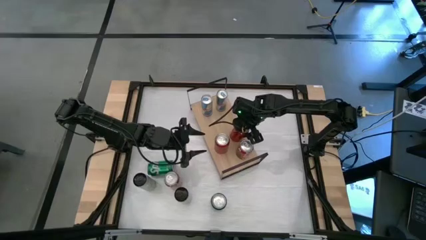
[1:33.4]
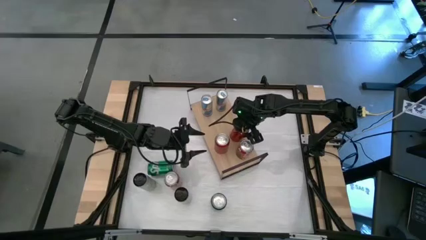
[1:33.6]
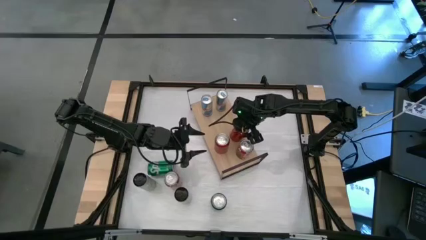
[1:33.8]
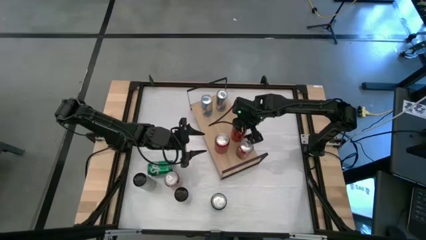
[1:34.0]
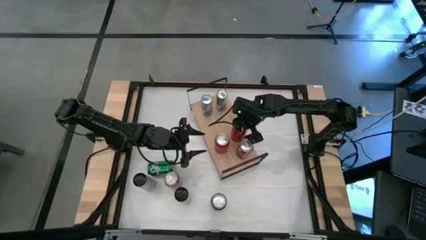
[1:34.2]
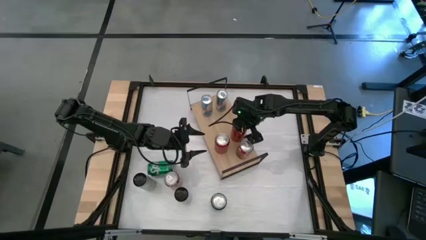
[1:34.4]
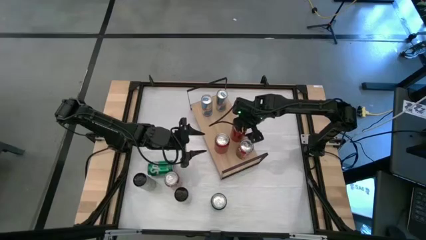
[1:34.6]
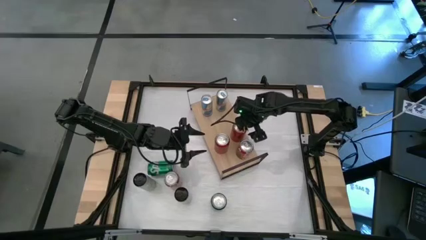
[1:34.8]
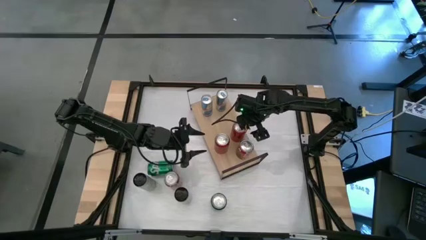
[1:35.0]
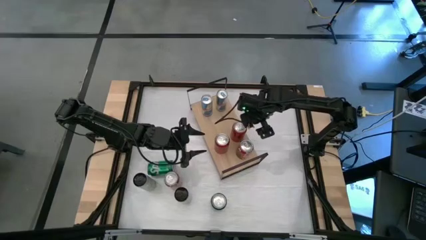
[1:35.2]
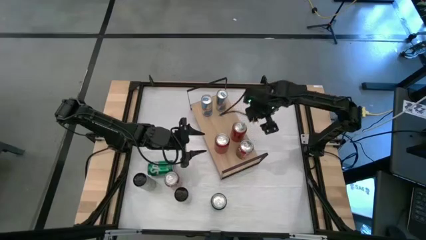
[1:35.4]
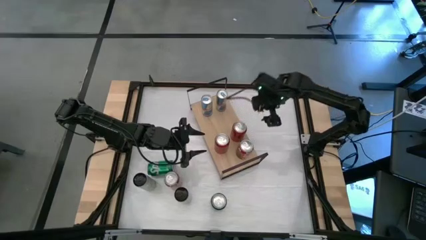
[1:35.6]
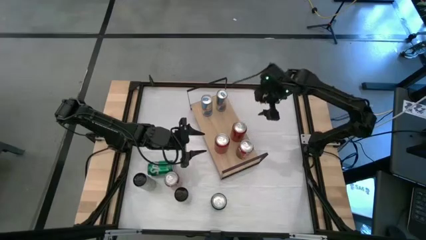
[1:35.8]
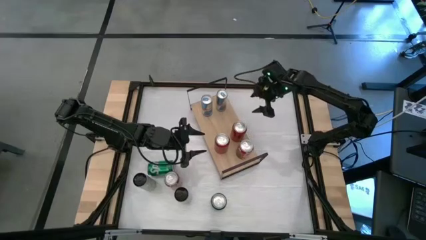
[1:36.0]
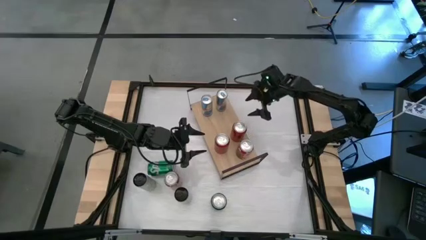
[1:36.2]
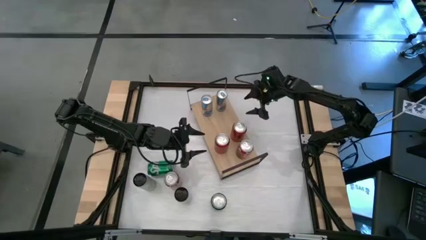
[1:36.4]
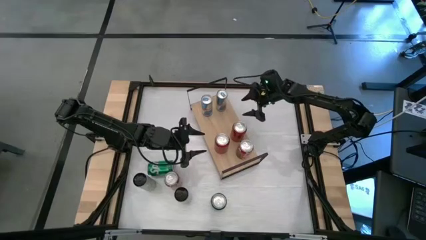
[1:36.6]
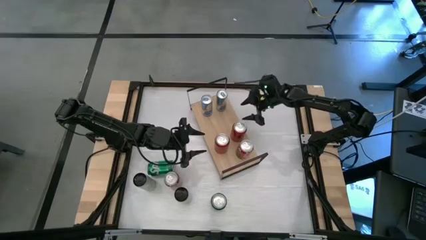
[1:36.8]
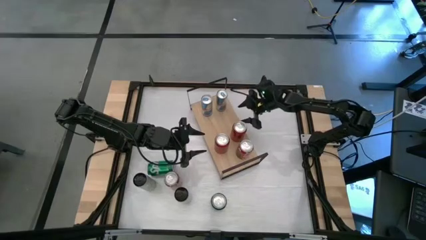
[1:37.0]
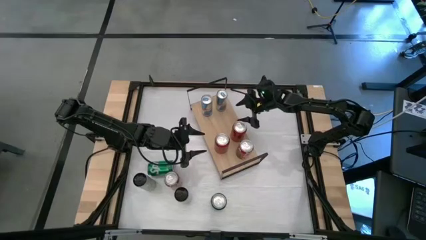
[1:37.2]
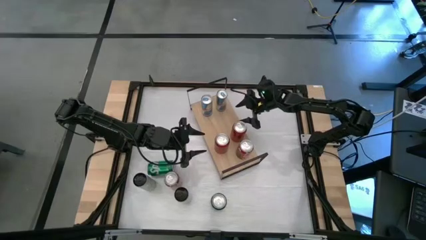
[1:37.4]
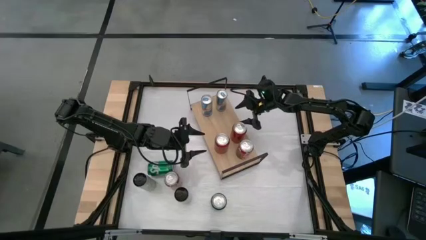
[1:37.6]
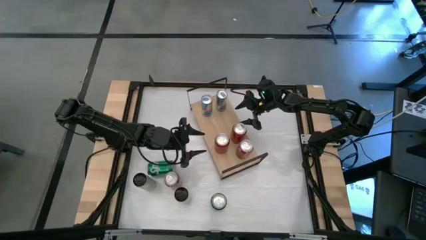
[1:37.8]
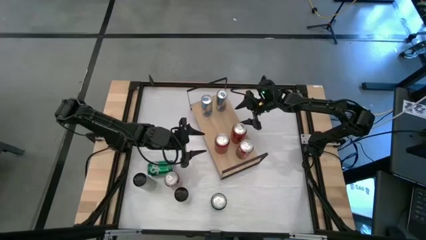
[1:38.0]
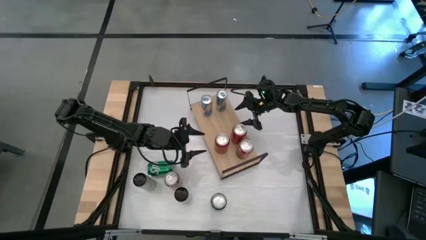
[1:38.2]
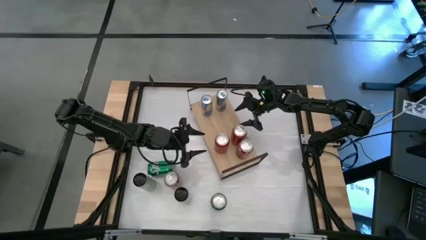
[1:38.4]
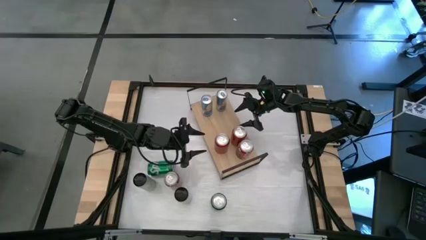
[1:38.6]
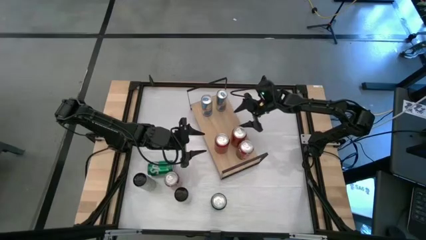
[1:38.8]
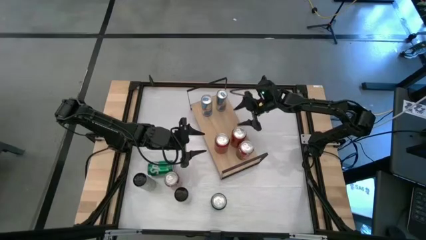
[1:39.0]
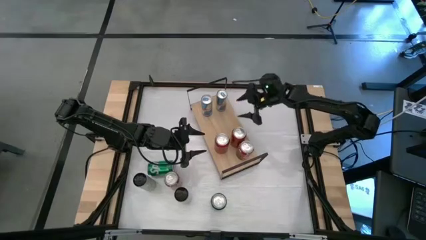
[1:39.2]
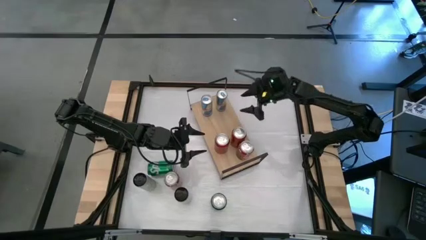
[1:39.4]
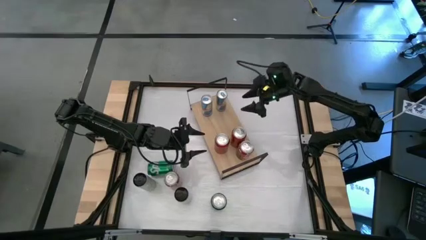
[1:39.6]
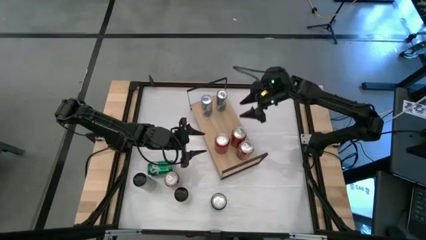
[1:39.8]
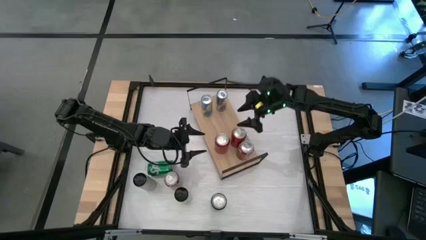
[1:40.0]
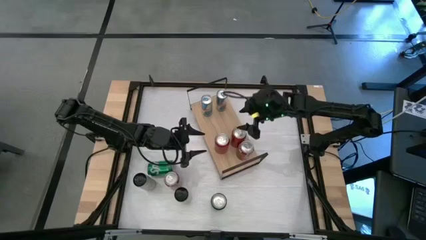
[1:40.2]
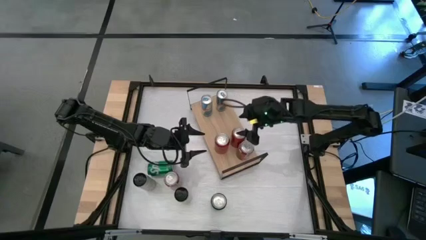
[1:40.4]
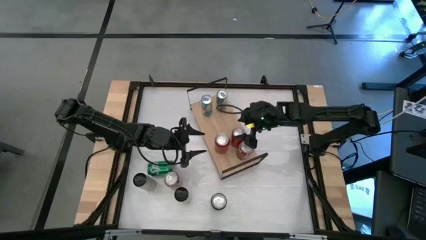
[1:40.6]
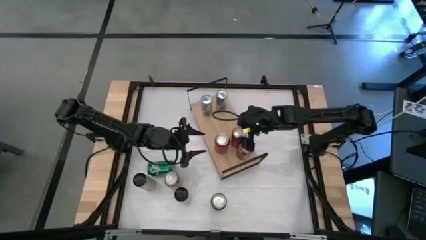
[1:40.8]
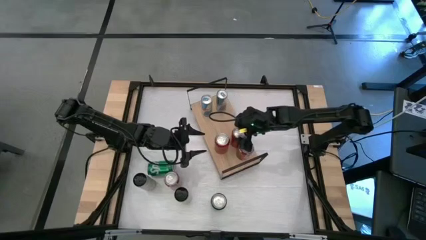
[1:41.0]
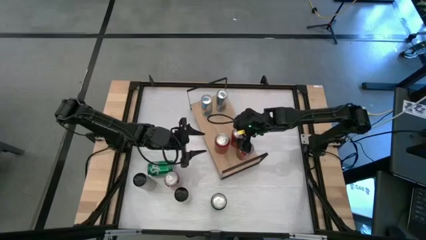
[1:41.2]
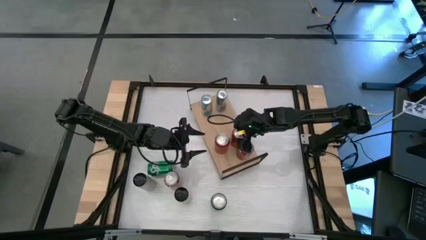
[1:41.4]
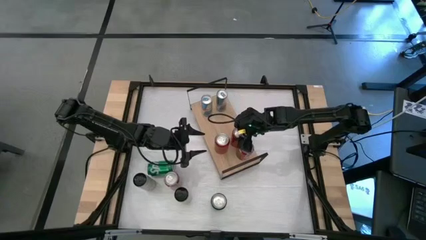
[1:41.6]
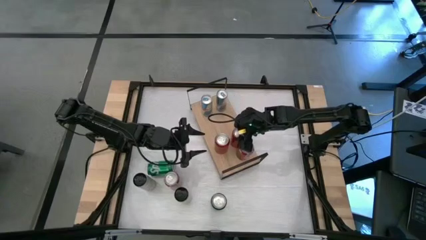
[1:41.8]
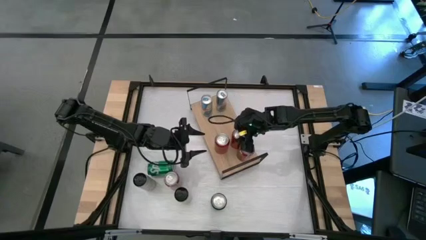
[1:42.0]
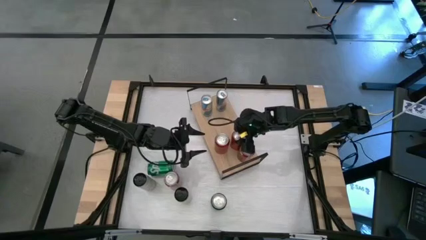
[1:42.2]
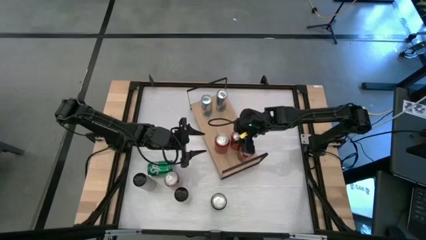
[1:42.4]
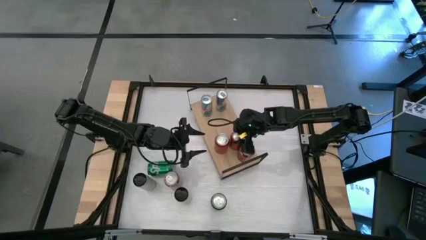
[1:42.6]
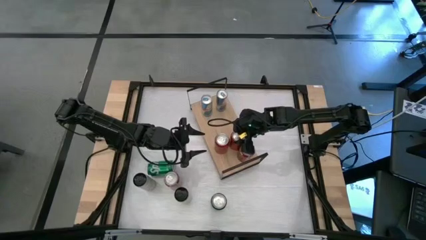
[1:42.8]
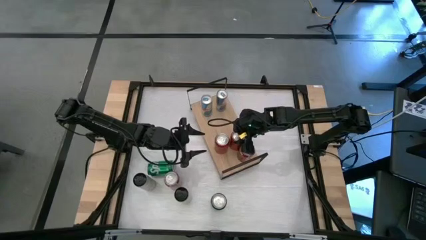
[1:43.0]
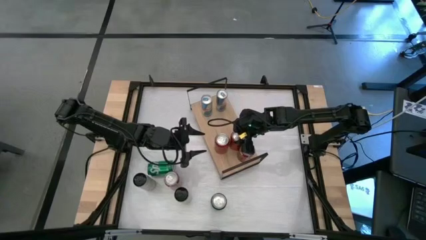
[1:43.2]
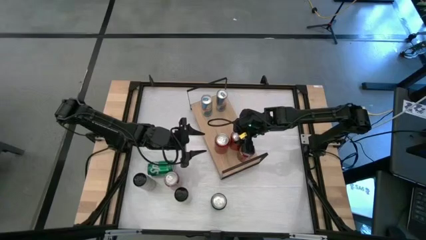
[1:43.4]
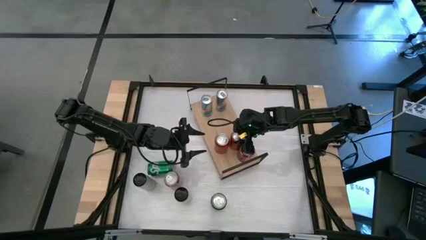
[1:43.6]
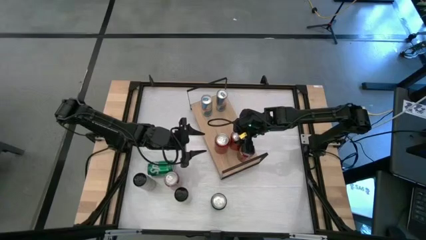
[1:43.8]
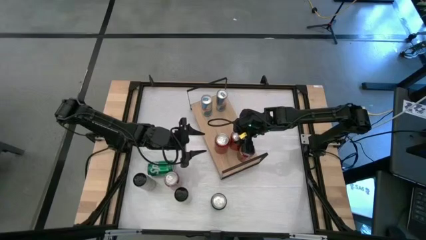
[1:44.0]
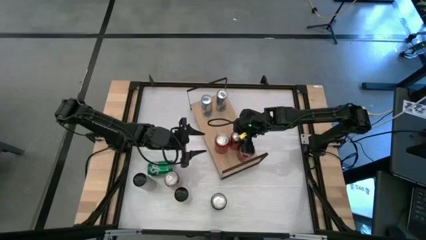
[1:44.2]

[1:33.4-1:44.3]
Task: Place canned beverage on shelf
Put the red and black soda can on the shelf aligned with the other red and black soda can

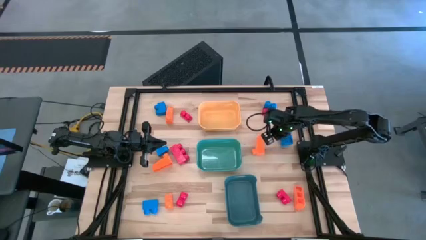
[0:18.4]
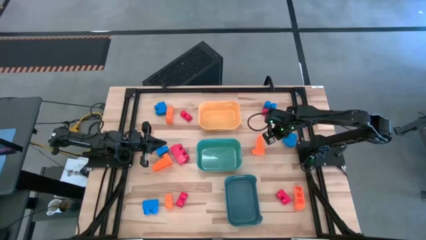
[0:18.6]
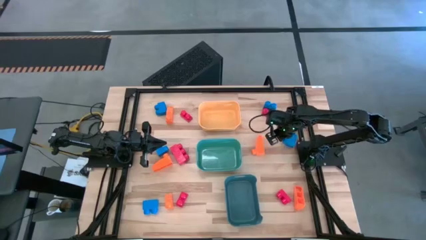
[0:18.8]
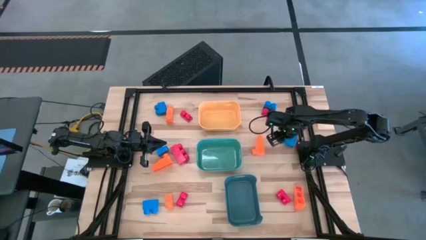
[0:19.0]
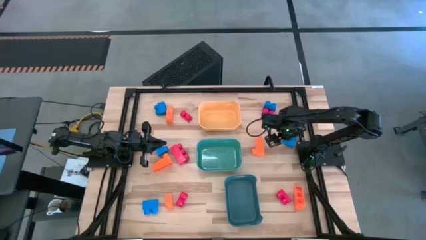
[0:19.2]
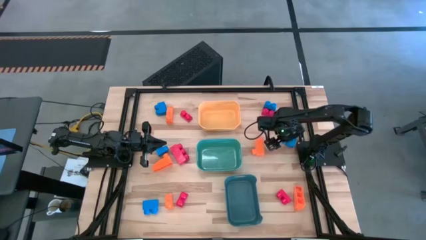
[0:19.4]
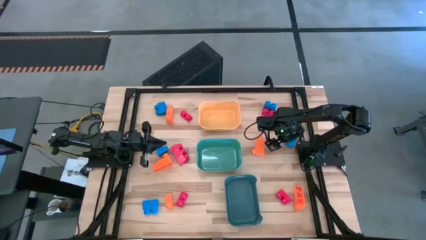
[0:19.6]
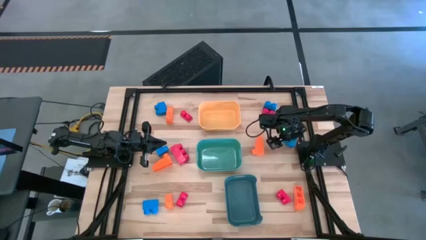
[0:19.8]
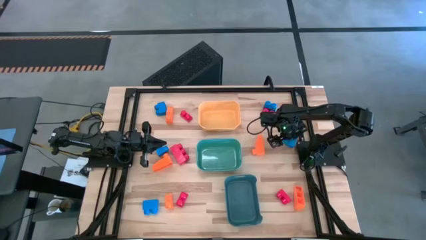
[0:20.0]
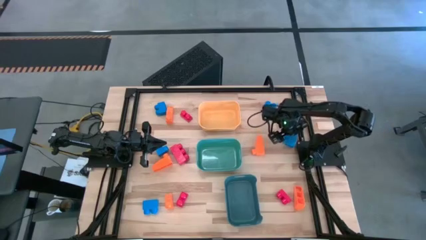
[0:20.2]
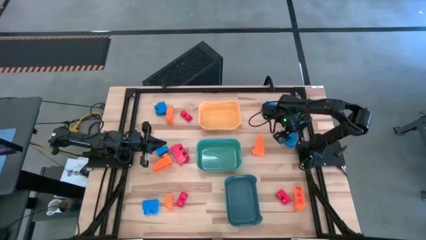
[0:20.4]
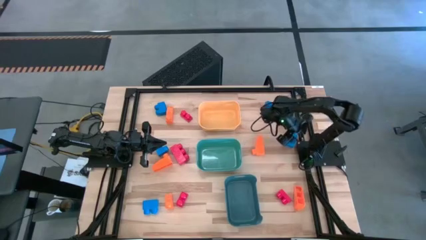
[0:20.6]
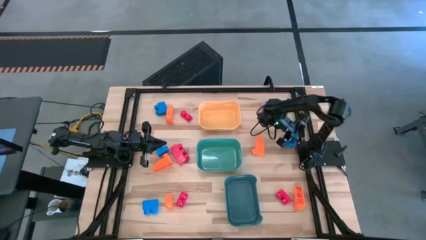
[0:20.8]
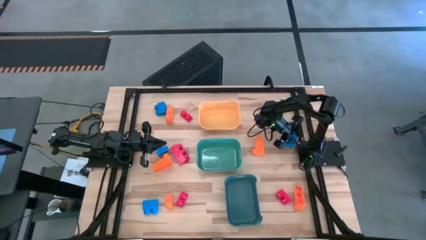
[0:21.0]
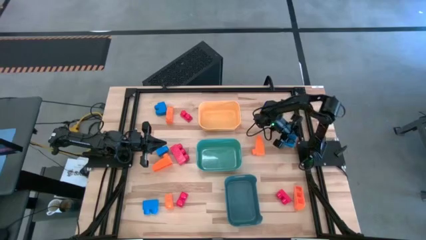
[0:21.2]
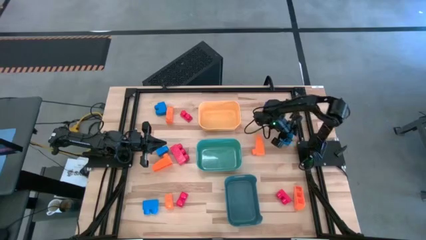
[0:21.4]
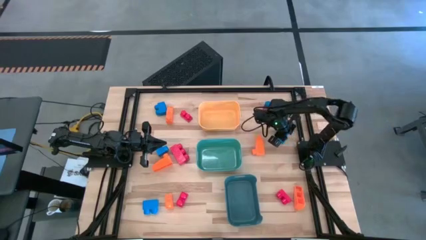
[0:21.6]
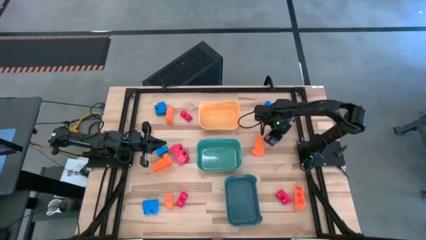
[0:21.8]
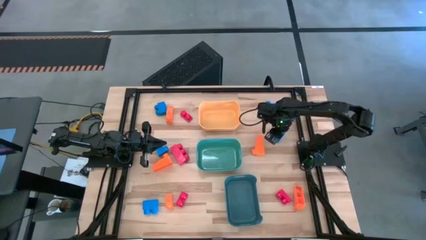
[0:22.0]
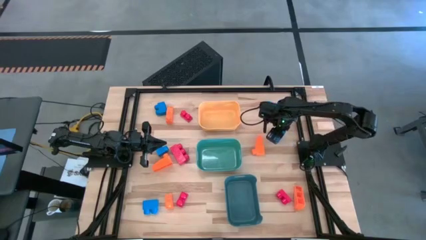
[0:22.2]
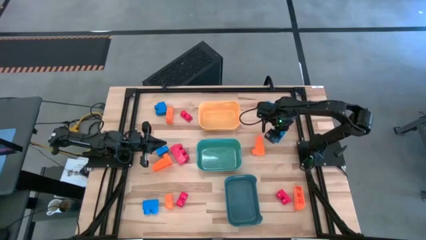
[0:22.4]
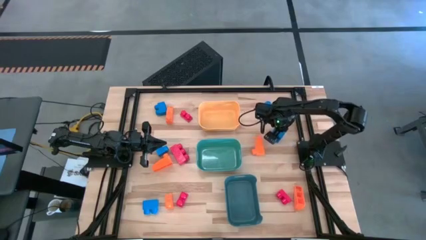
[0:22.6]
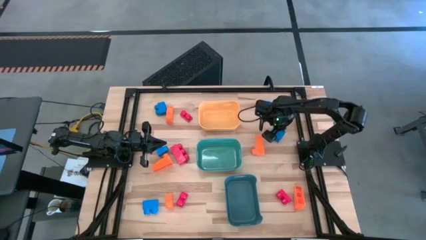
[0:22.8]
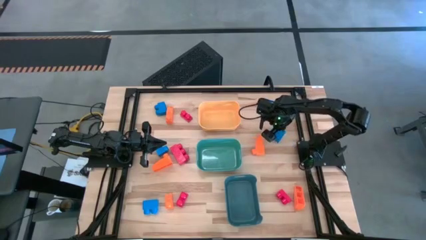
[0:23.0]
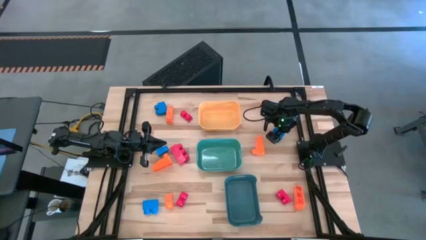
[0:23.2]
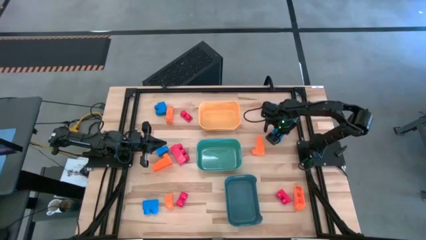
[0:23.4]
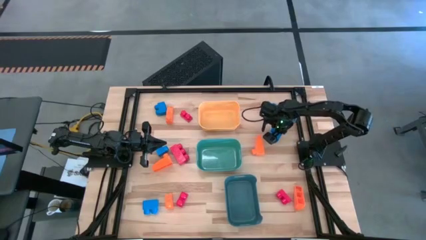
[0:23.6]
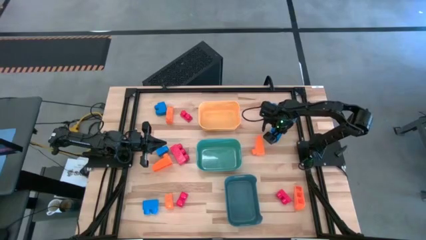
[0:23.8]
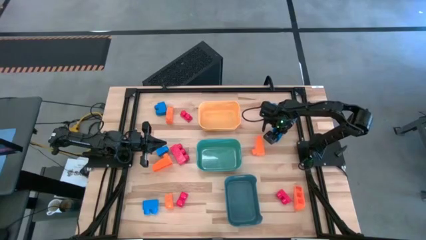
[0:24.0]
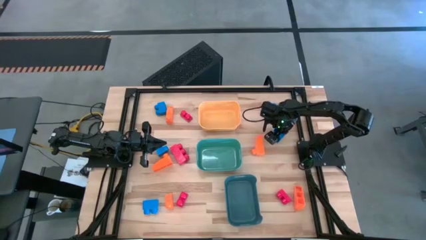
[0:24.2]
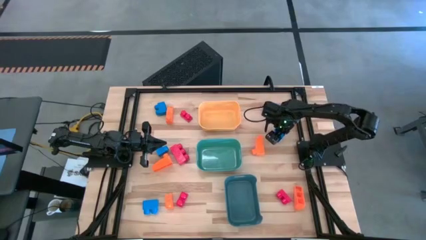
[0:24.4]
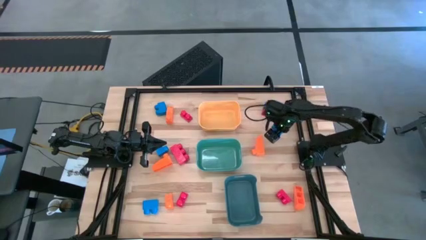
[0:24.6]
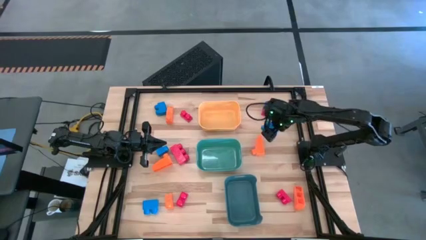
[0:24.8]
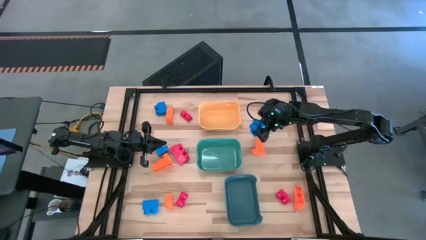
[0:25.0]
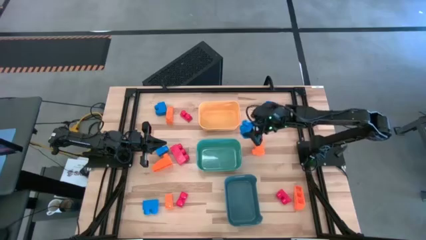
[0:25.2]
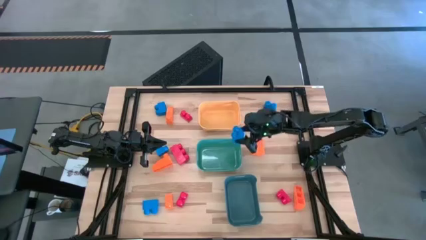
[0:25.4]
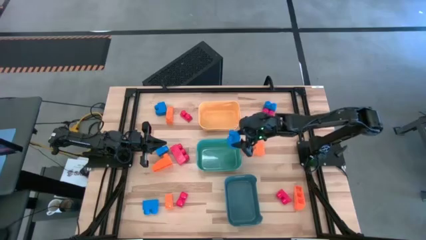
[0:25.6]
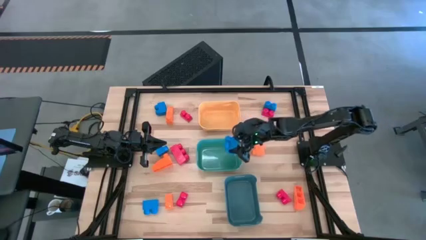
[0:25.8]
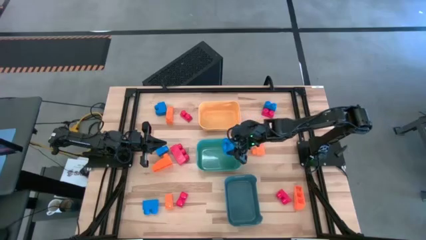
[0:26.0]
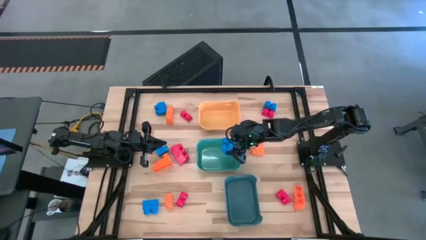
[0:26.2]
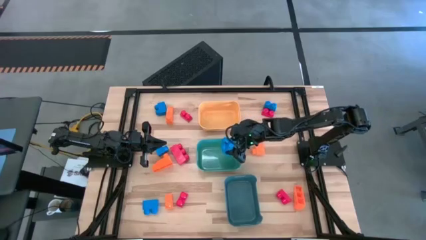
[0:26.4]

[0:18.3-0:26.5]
Task: Sort & place blocks by color
Put the blue game piece into the green bin
